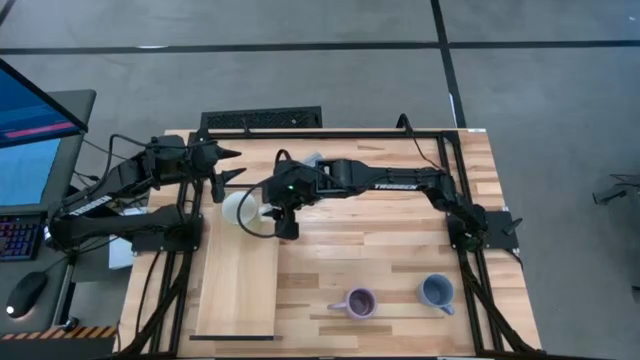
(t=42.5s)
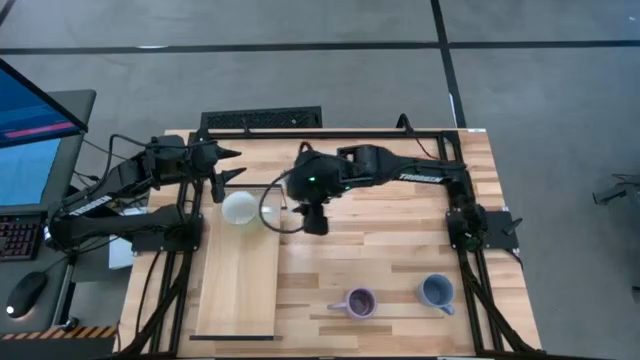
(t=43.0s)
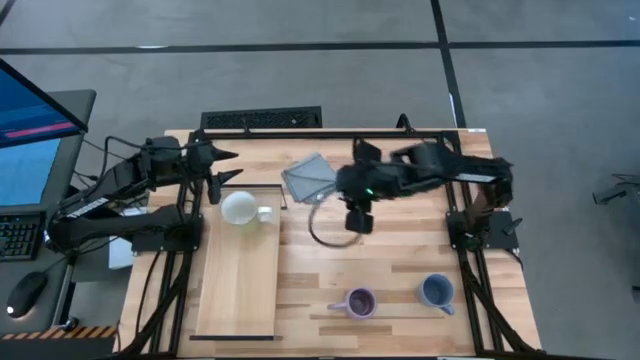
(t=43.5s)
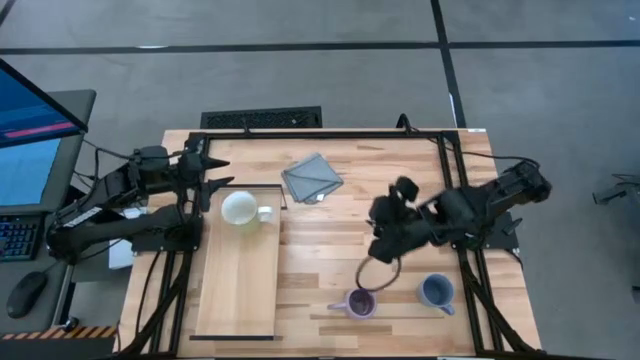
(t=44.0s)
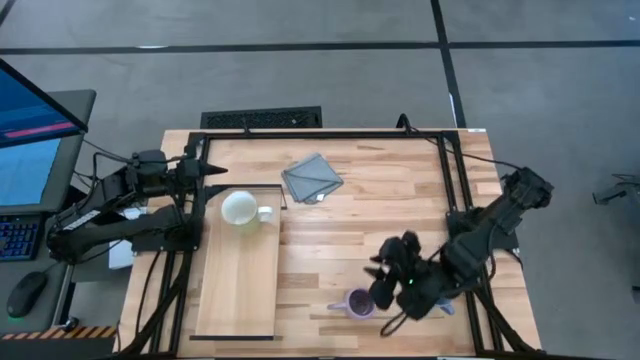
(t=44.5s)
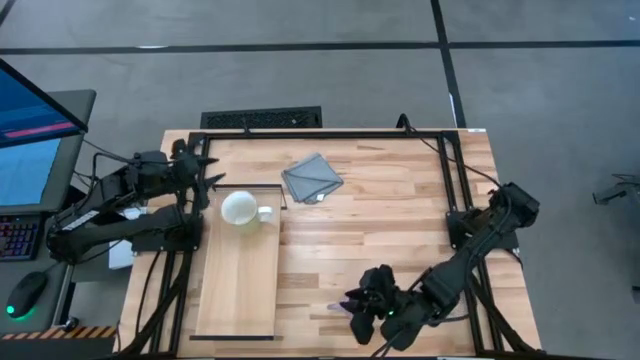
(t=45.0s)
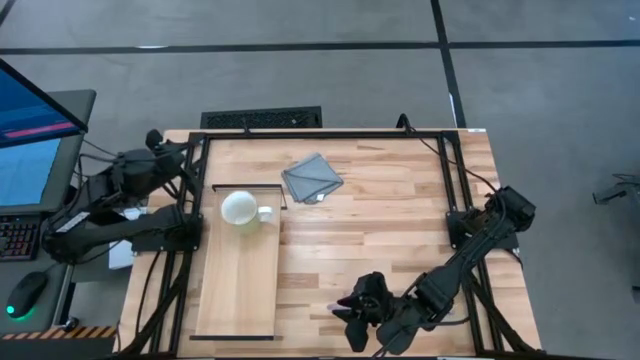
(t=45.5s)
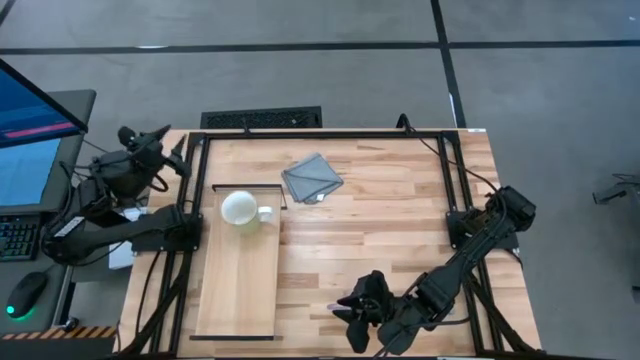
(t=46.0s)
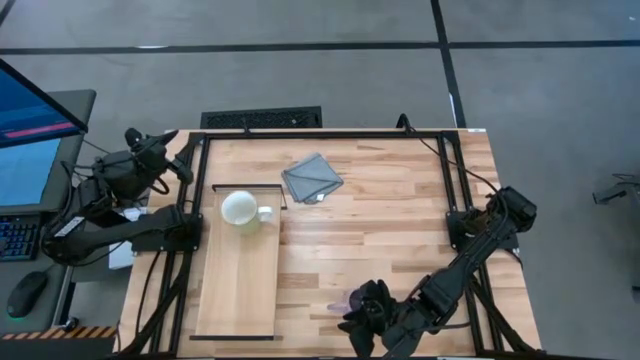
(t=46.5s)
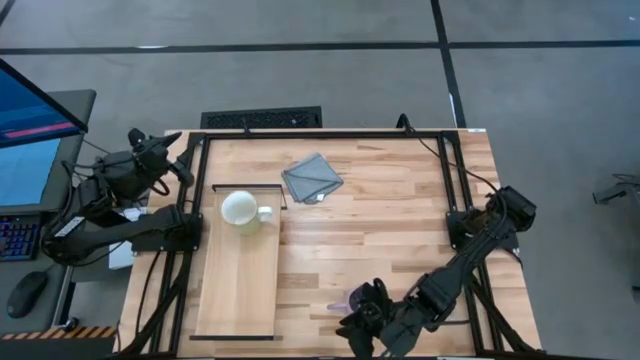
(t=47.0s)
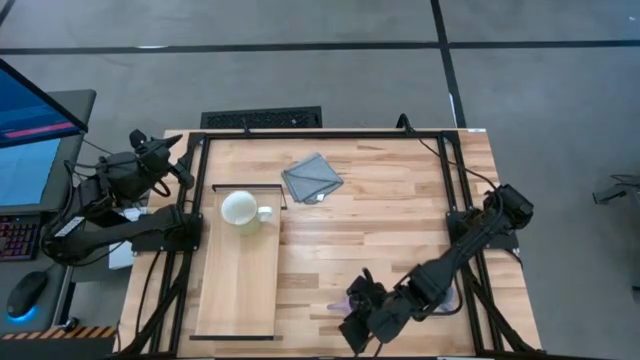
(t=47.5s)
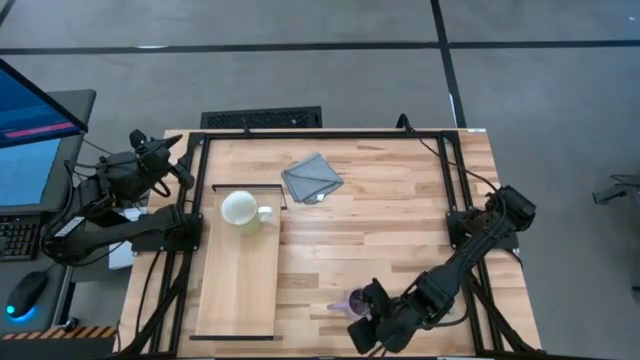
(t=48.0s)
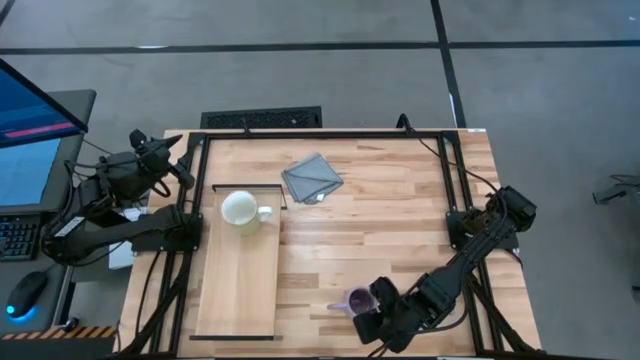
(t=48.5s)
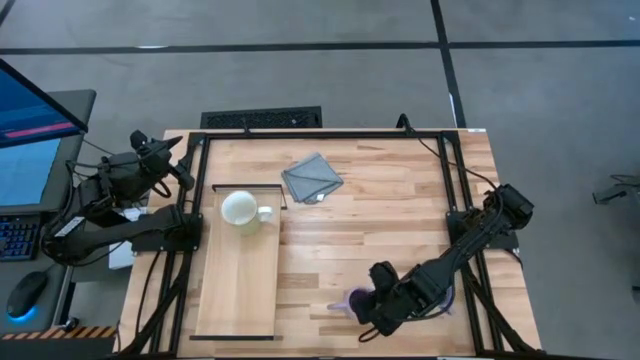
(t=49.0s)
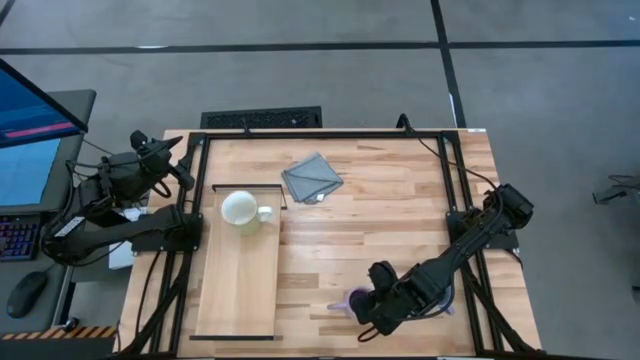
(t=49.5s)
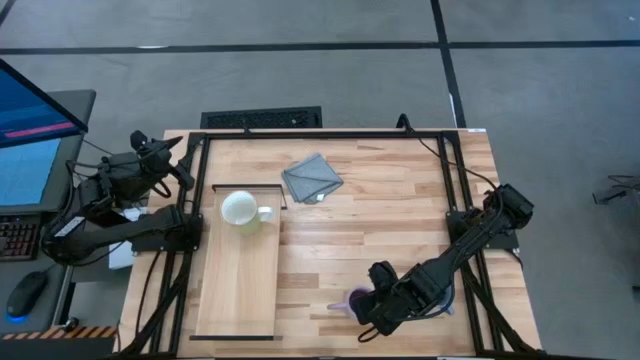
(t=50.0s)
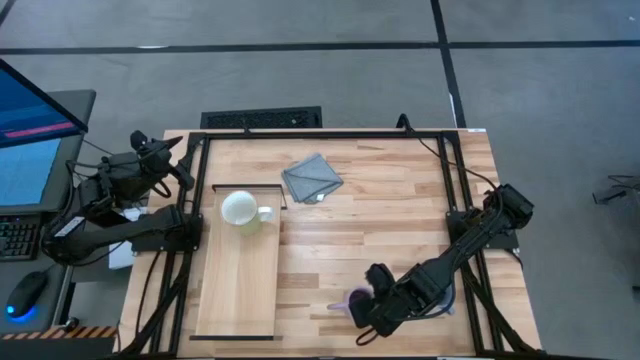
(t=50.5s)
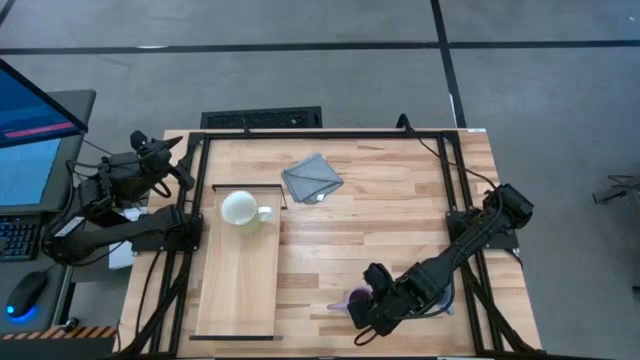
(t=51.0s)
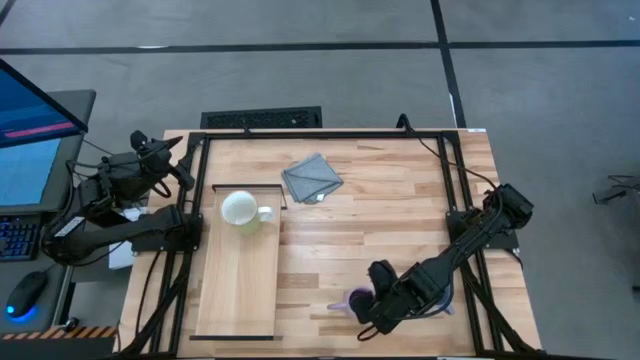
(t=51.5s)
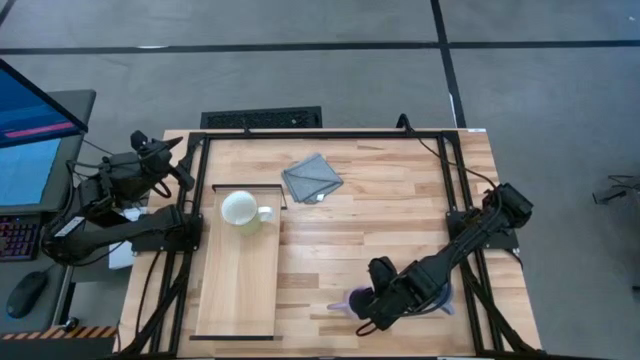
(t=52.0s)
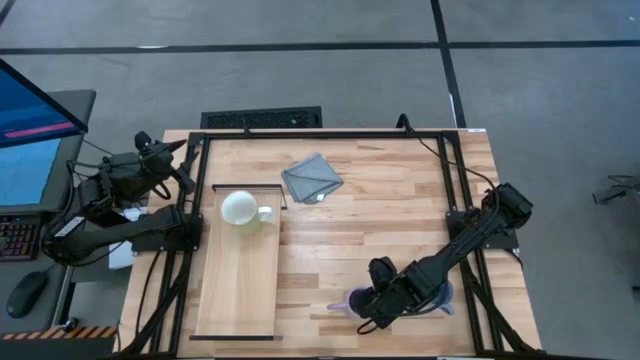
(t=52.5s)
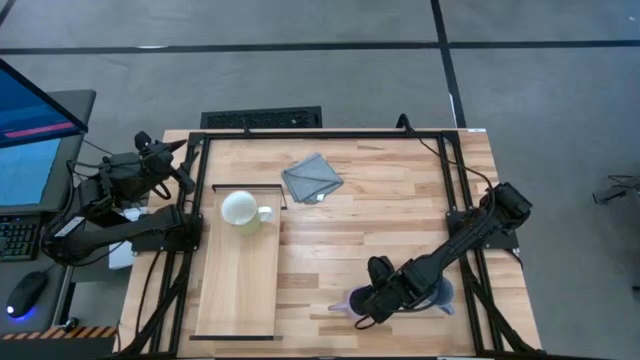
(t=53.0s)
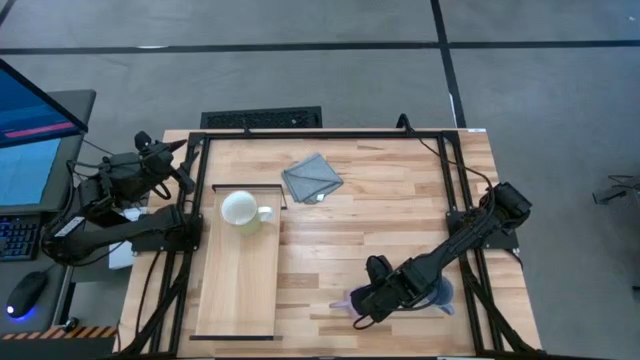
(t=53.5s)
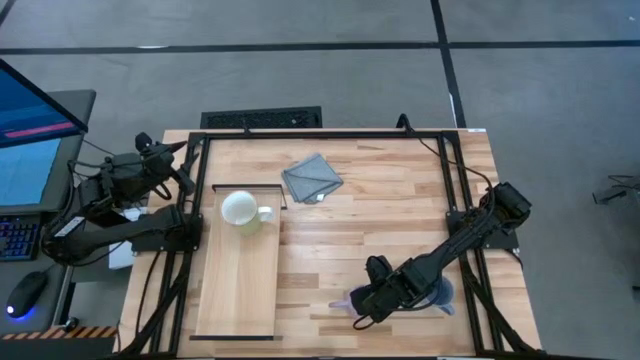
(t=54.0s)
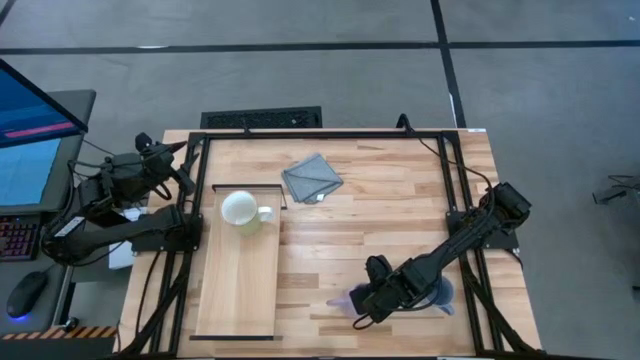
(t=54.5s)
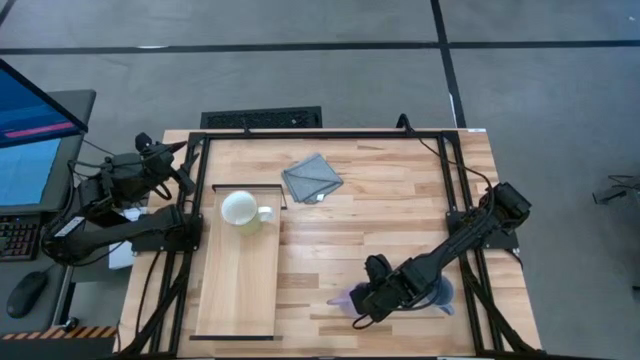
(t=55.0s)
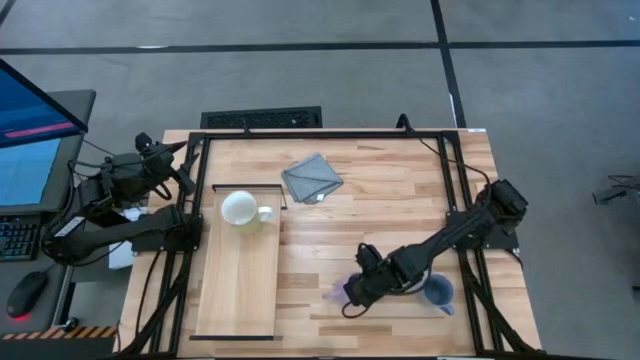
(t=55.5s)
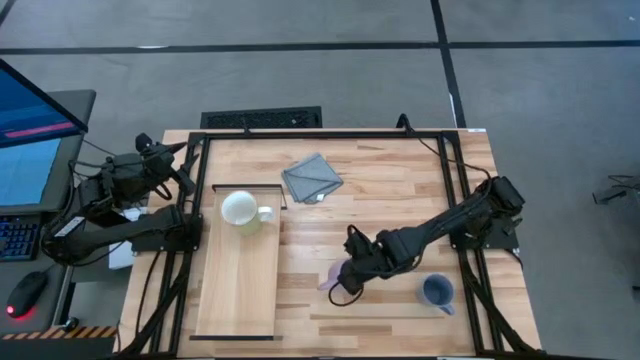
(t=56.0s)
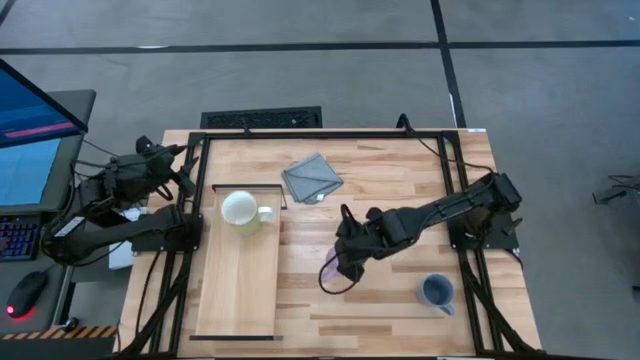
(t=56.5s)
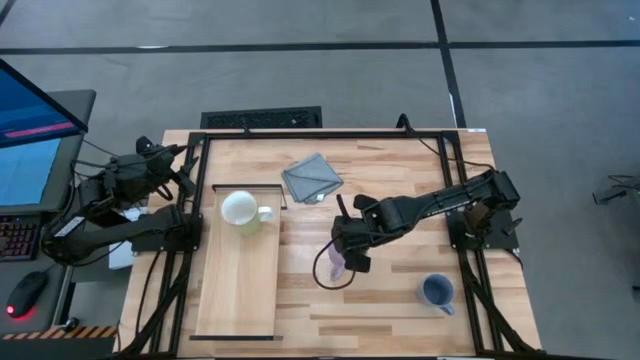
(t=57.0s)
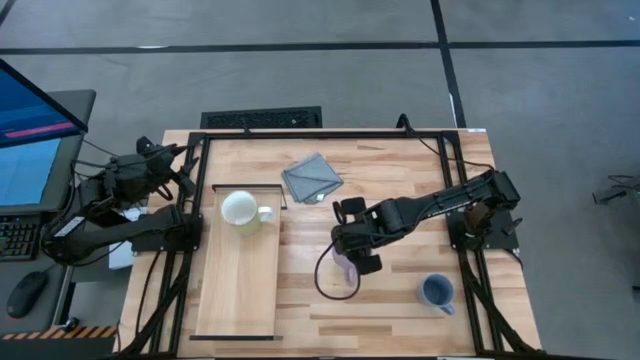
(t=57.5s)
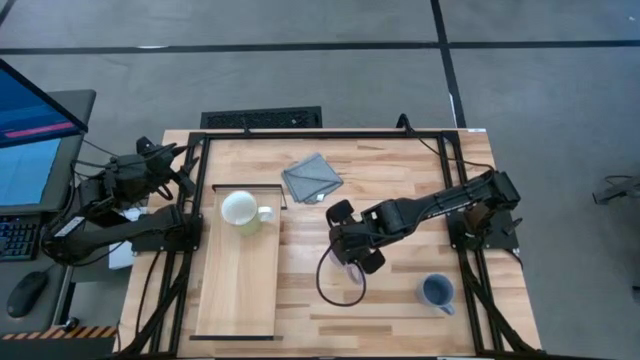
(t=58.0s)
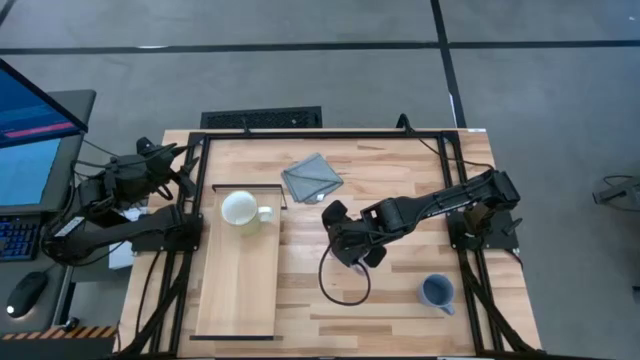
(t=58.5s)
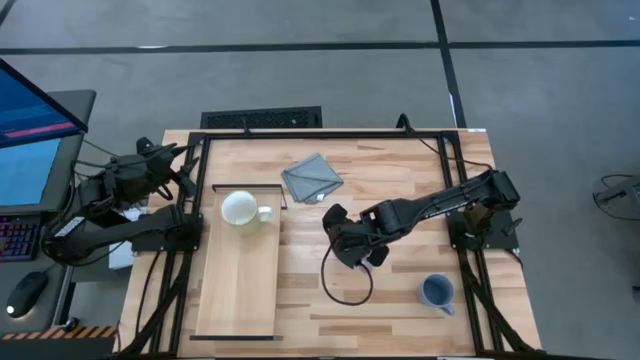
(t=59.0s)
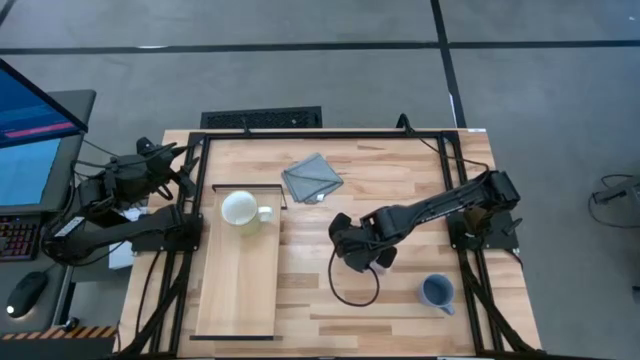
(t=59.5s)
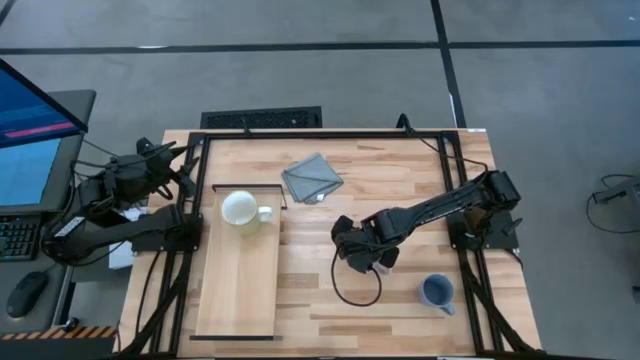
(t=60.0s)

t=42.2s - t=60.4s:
Task: Stack small to large cups/mugs on shelf
Put the purple mug on the shelf

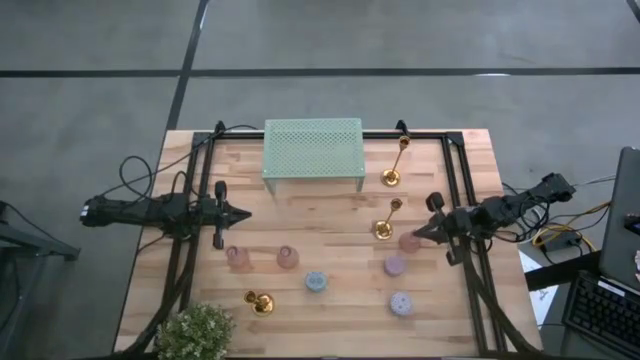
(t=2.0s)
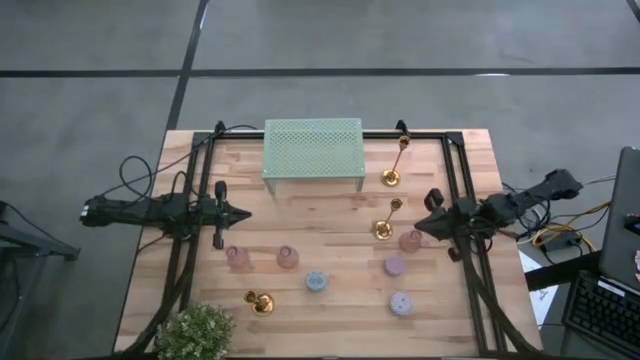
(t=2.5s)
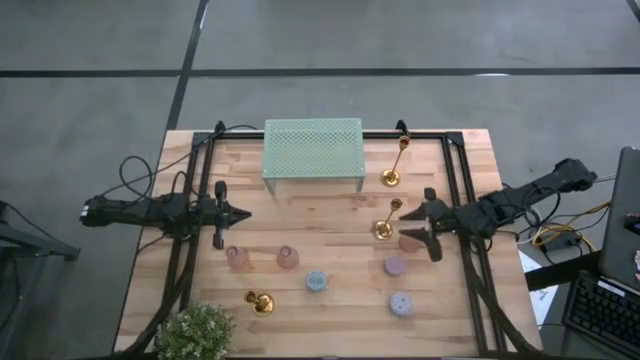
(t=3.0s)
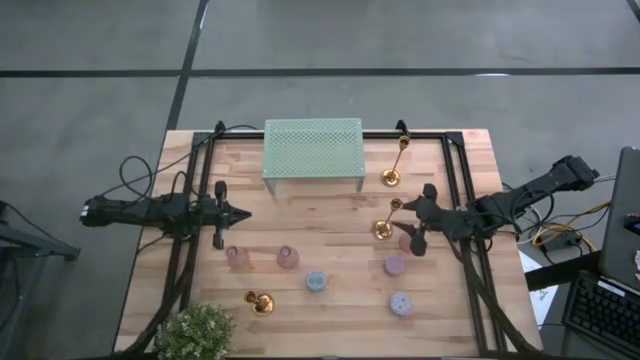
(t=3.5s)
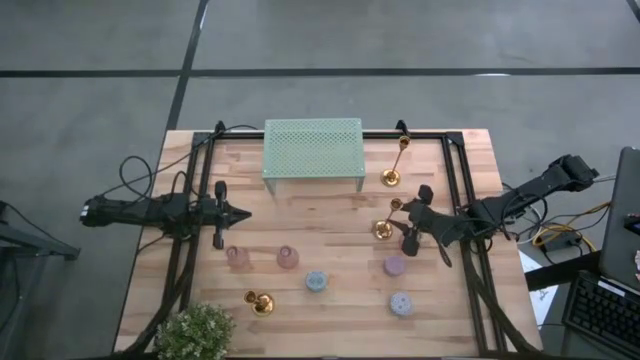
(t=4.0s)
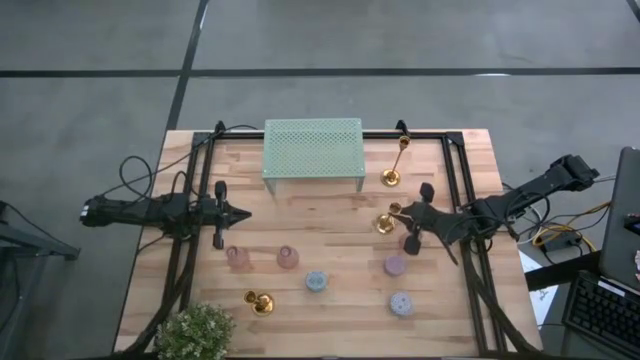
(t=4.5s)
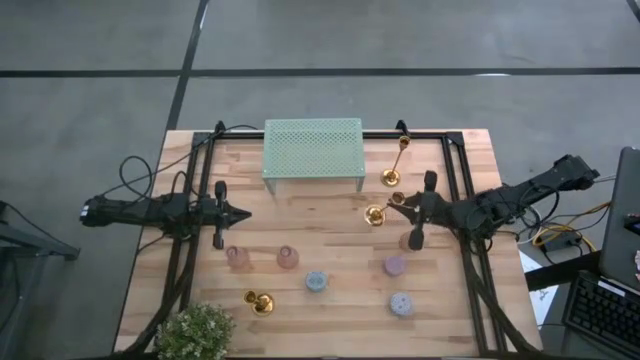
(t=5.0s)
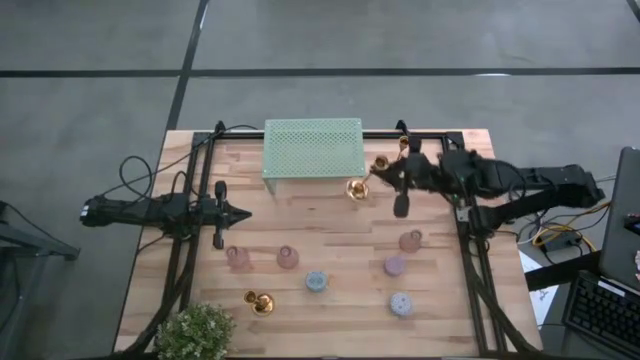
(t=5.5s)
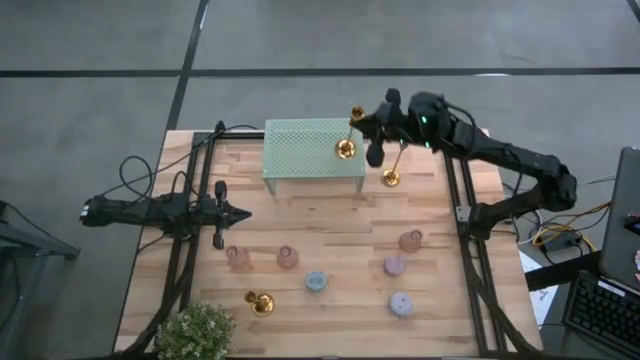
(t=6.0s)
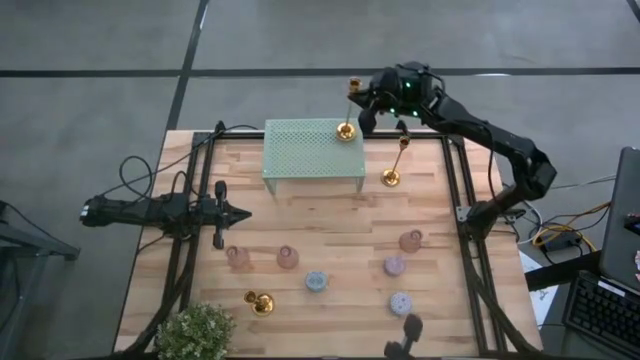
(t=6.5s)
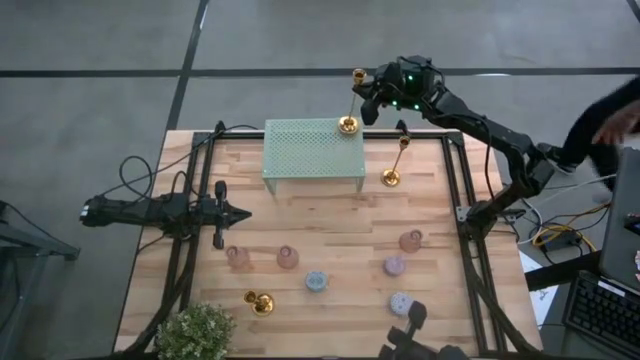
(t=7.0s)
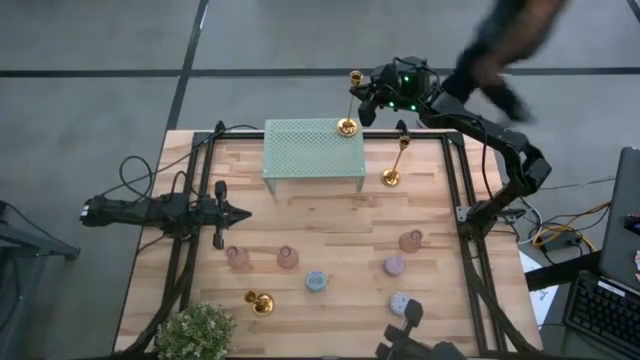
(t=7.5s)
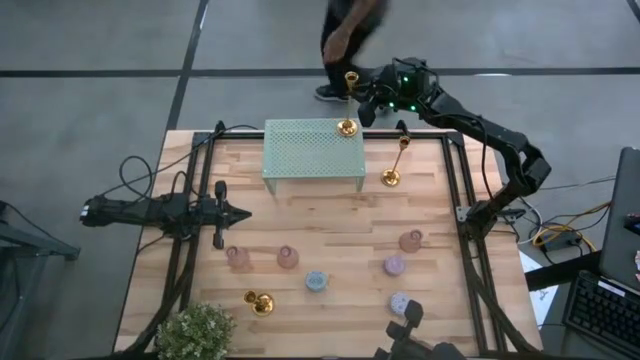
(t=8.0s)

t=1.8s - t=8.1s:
Task: Pick & Place candle stick holders
Put the middle gold candle holder on the shelf
